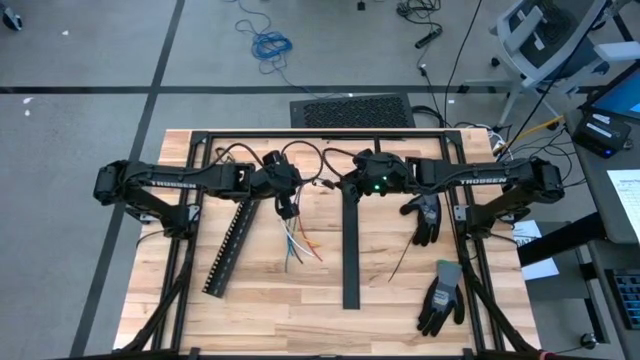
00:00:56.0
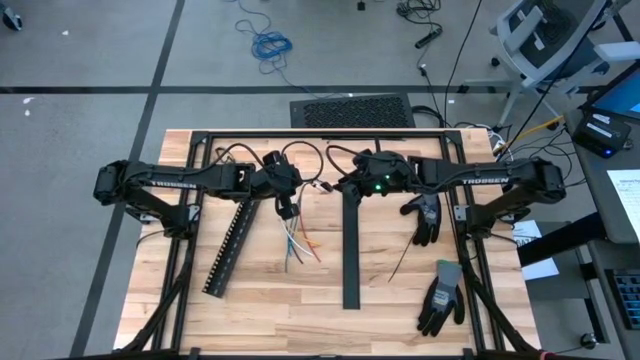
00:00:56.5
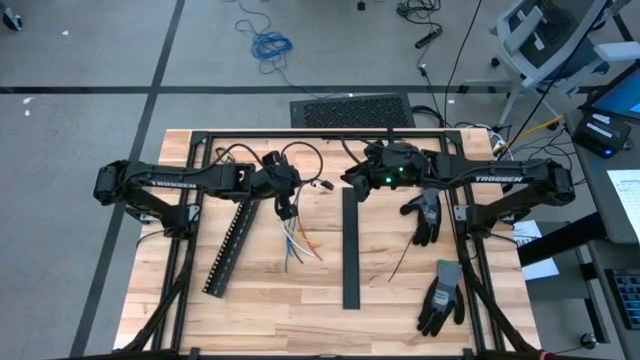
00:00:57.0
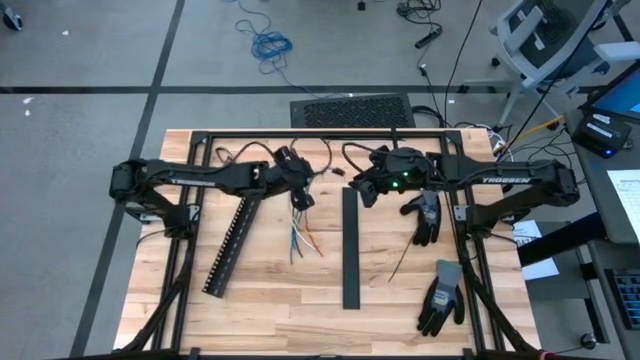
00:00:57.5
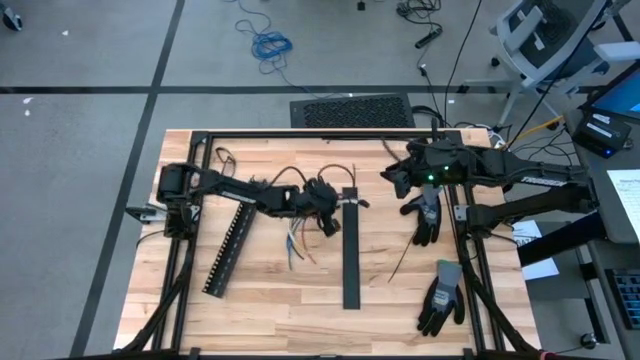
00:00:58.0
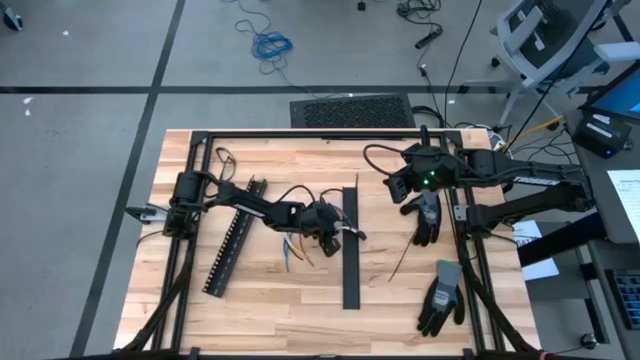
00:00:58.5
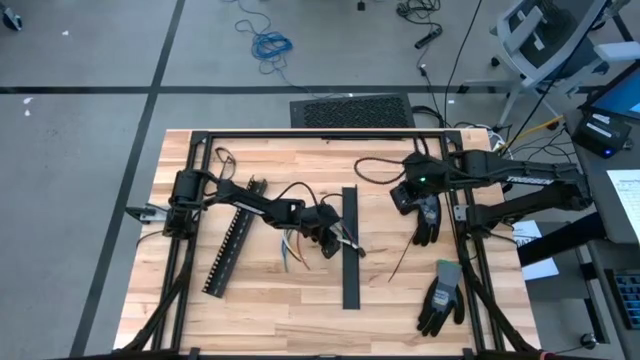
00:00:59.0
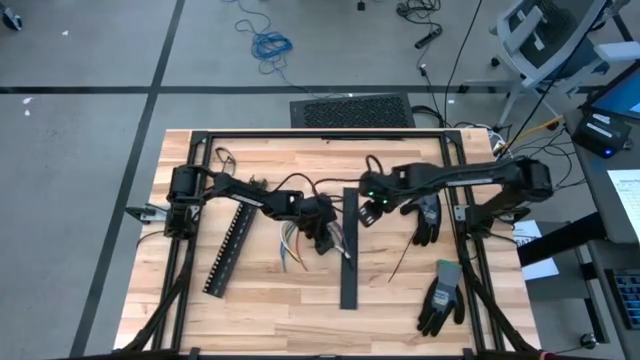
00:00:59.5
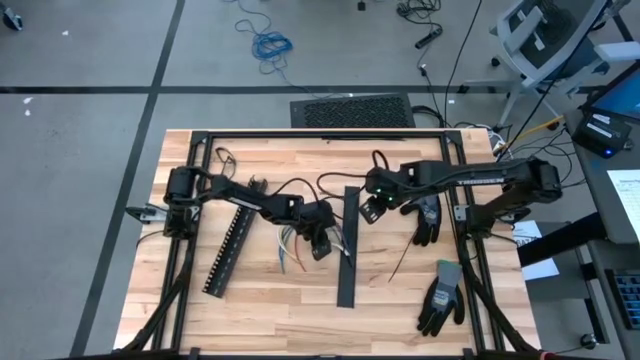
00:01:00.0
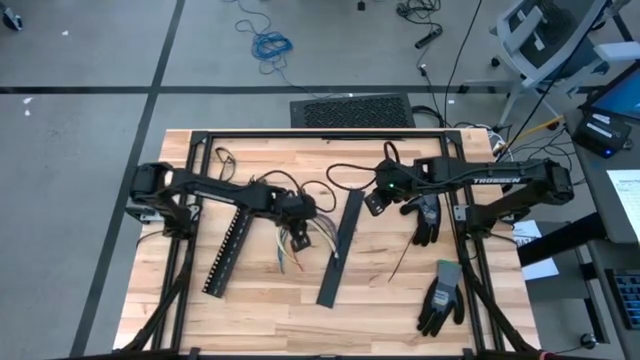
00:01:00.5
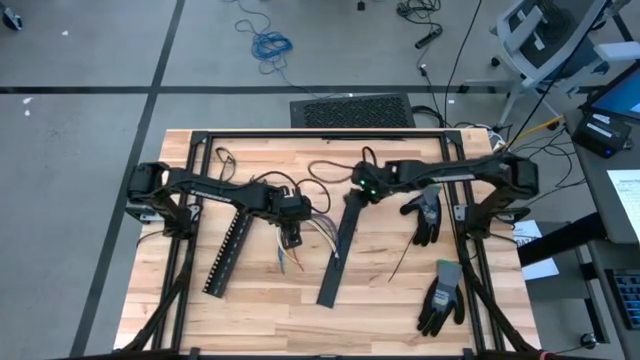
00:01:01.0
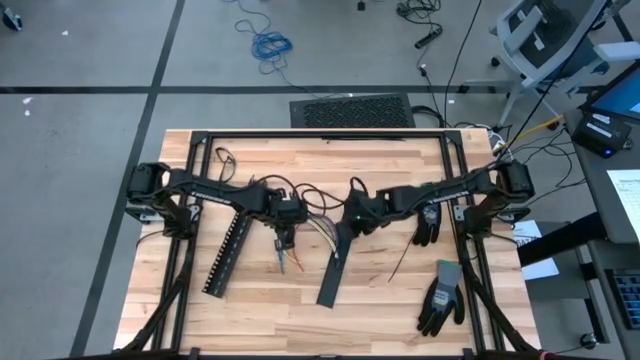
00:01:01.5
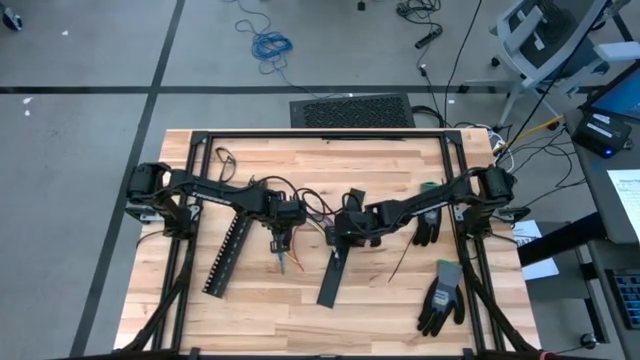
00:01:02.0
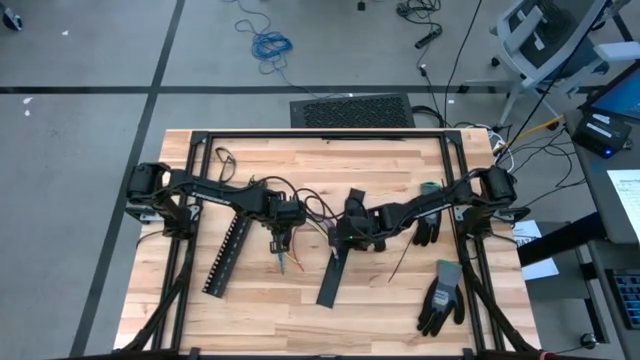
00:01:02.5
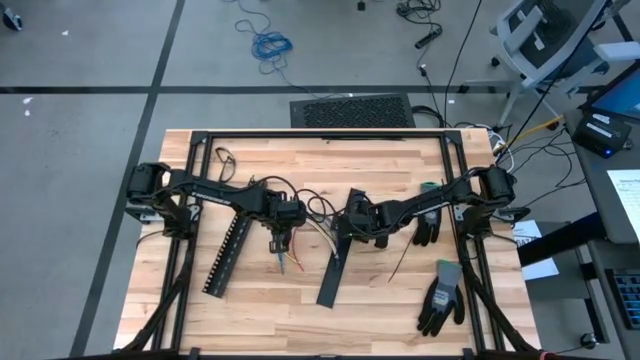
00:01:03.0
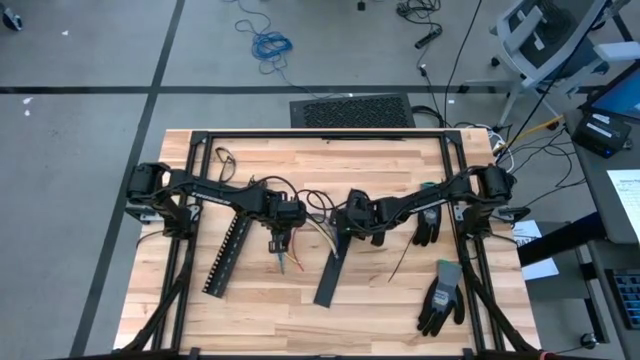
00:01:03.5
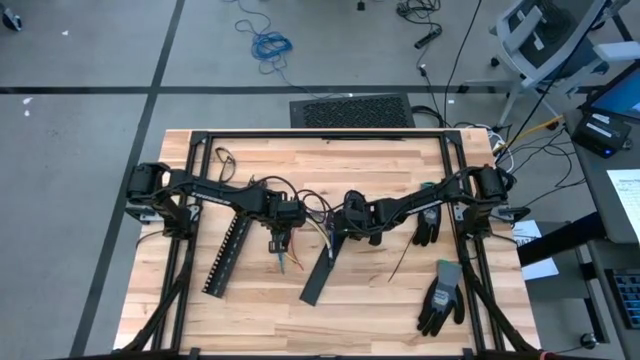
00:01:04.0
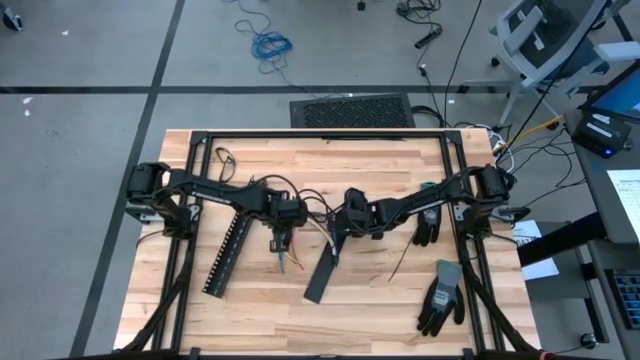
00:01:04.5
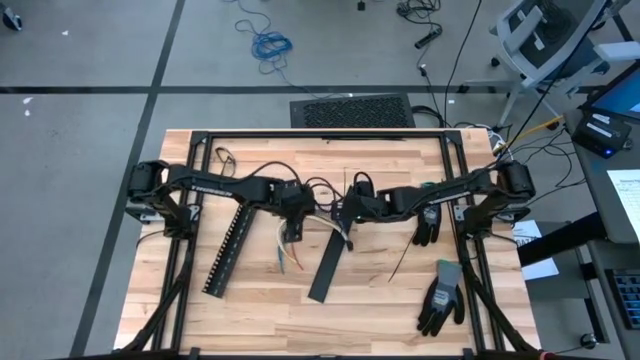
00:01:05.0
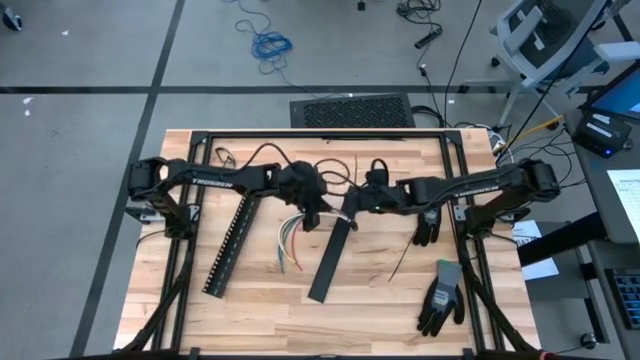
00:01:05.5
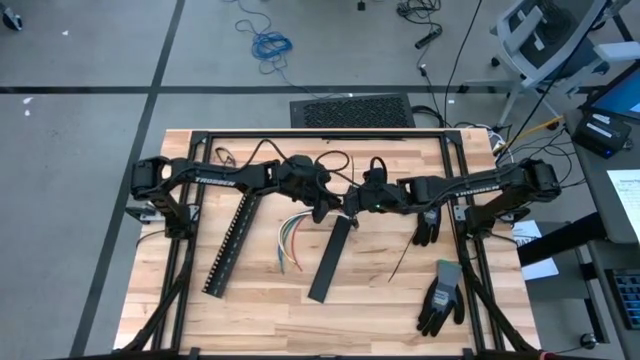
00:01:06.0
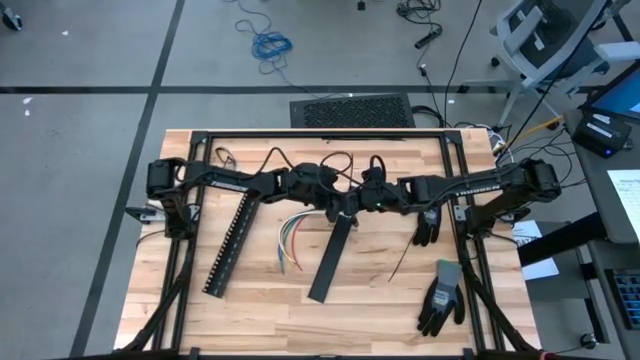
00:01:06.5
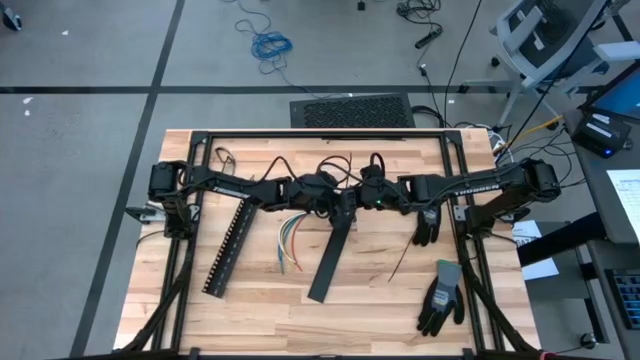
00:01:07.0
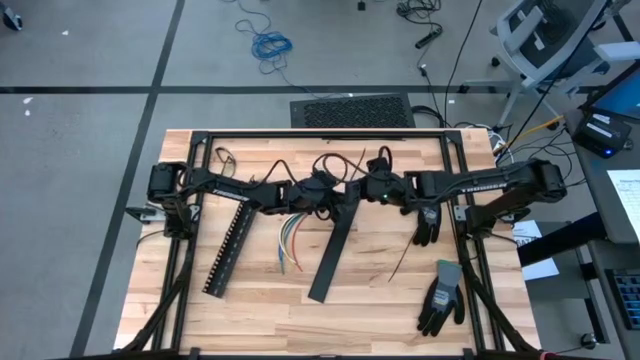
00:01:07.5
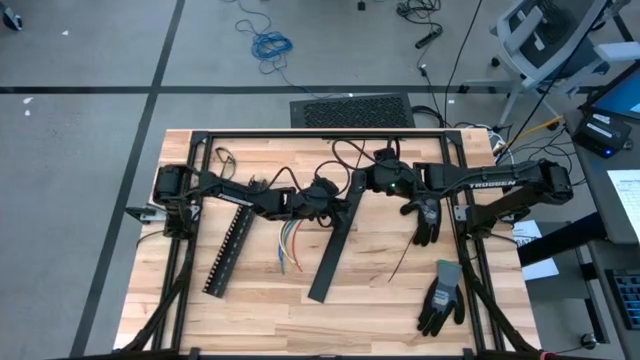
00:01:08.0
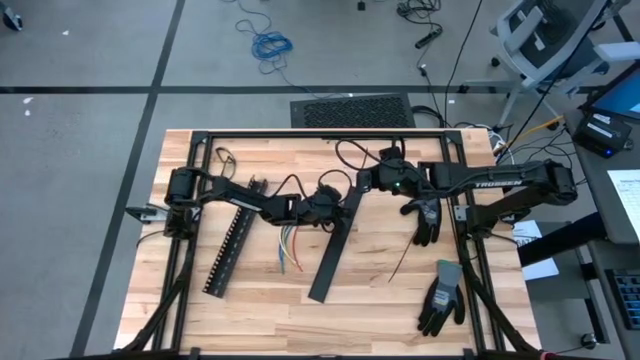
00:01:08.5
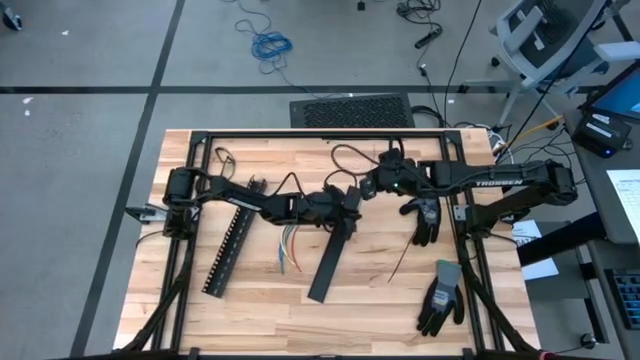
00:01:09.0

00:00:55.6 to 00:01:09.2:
Task: Ziptie cables
Wrap the black zip tie around the cables

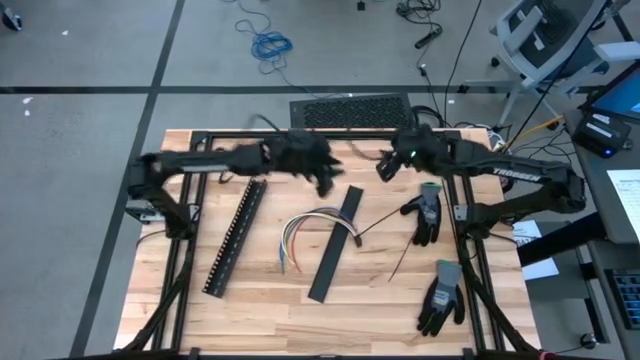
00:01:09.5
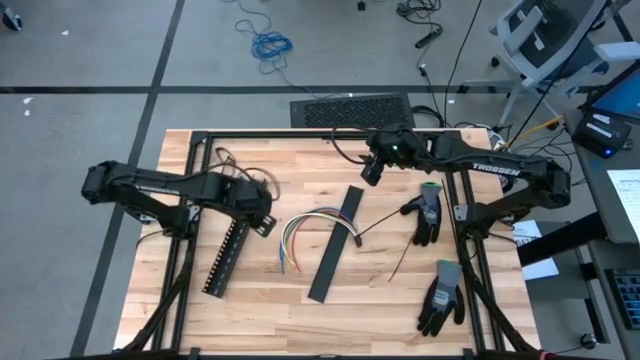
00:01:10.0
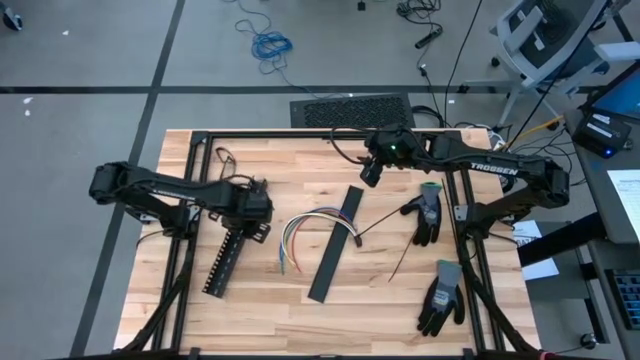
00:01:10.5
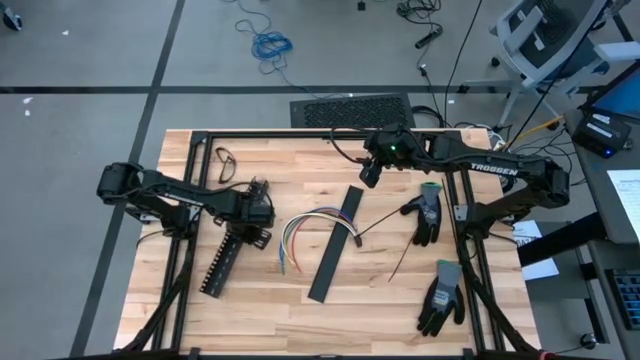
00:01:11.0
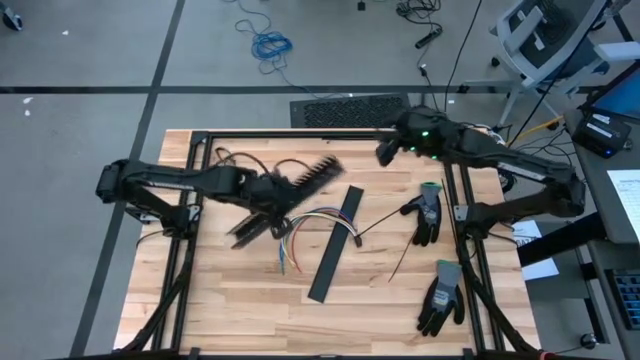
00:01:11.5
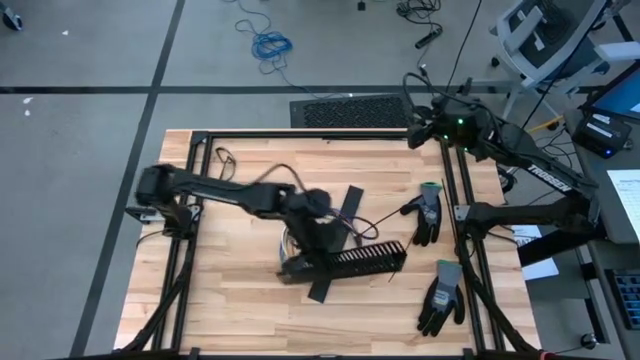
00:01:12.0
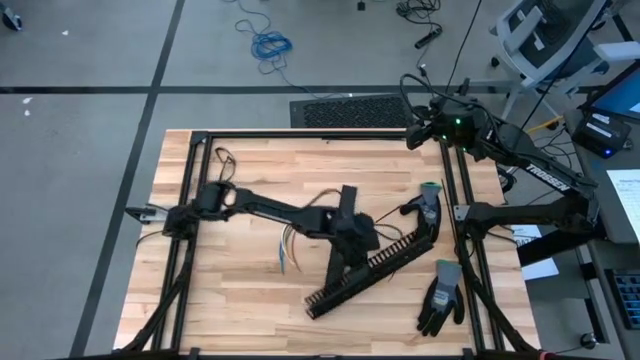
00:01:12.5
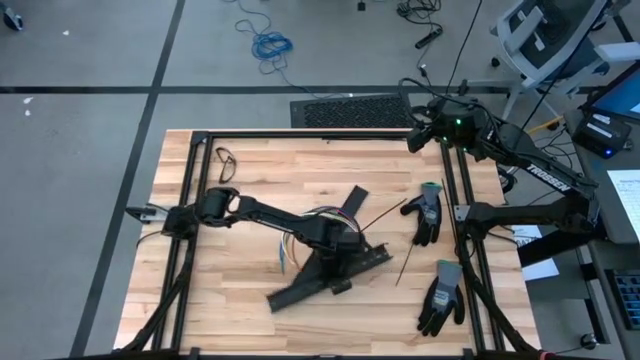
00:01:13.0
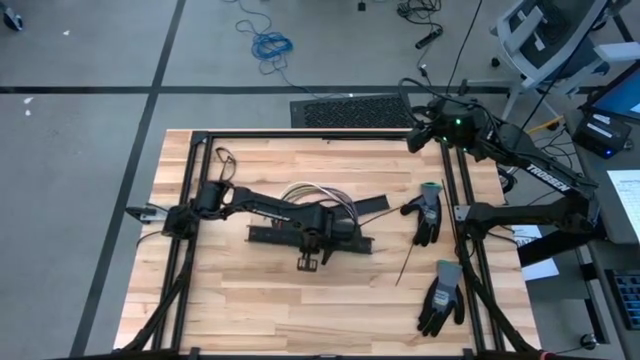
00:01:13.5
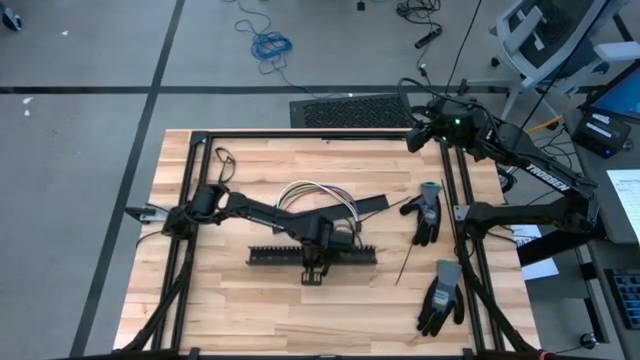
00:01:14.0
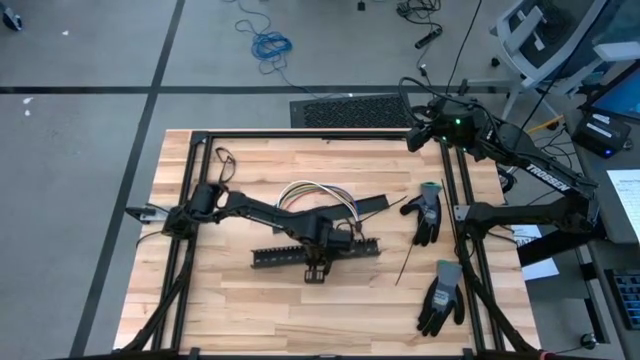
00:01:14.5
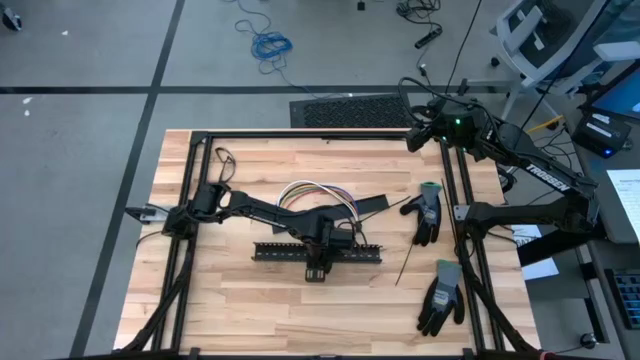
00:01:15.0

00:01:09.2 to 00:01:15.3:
Prepare the black cable duct

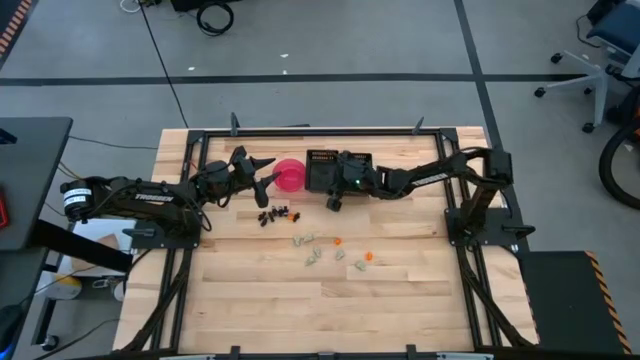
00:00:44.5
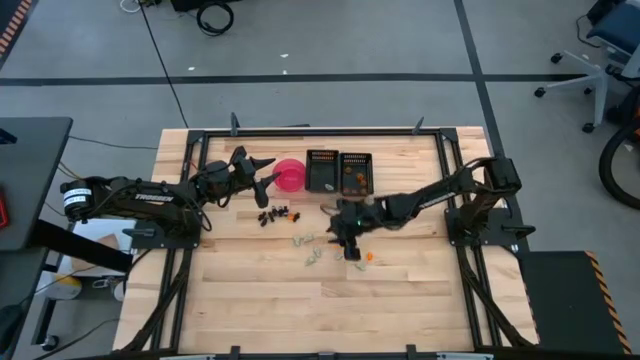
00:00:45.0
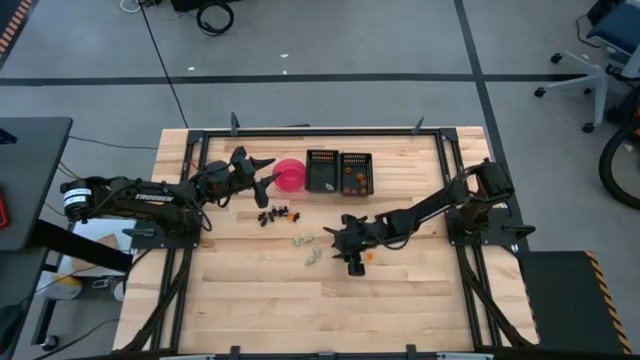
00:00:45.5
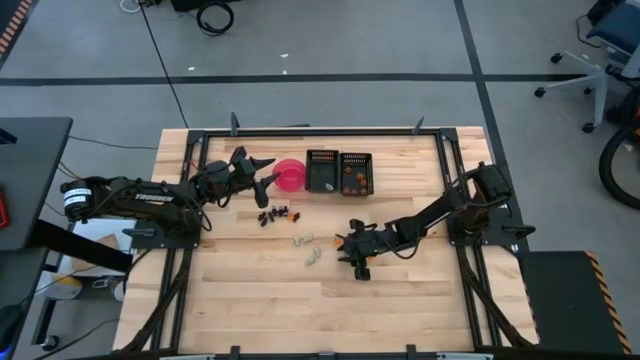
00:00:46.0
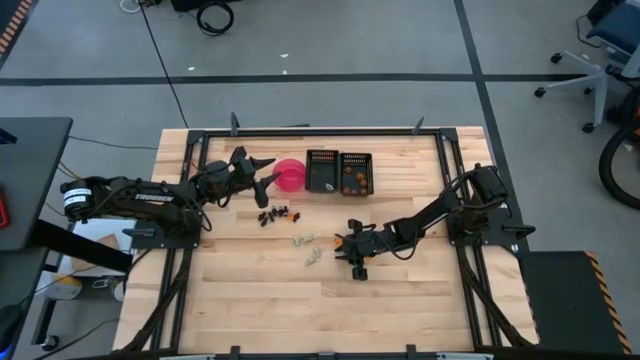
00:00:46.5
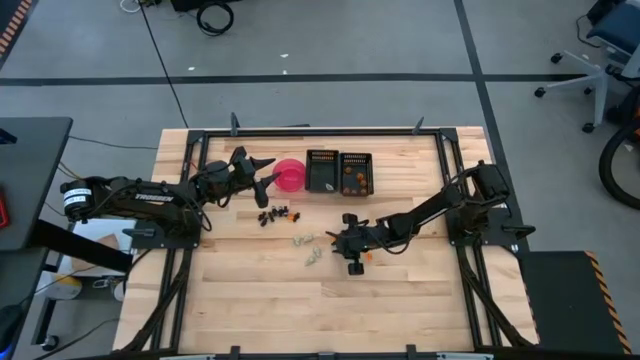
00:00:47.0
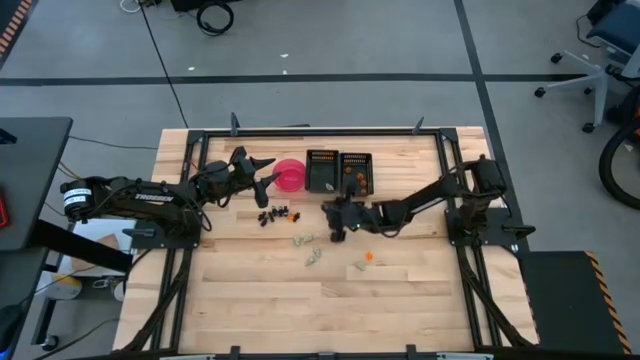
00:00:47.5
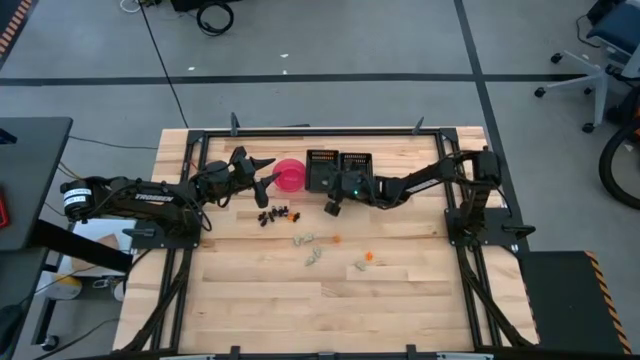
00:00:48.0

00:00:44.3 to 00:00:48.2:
Task: Sort Halloween decoration
Put the white skull toy into the left black bin
